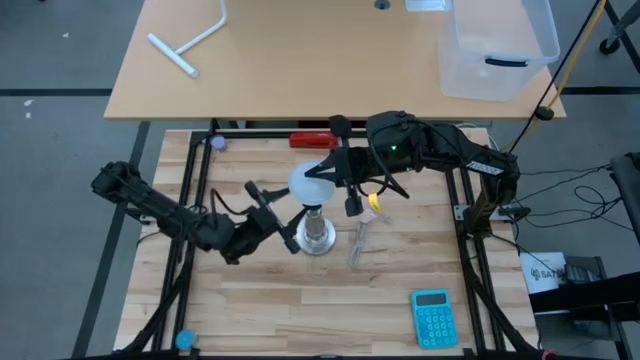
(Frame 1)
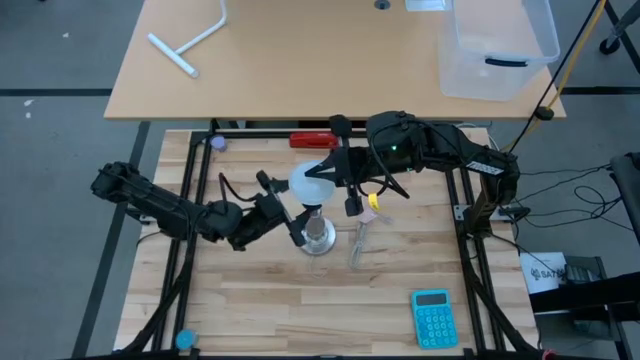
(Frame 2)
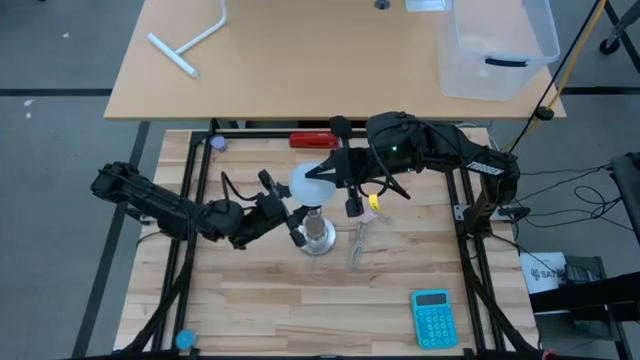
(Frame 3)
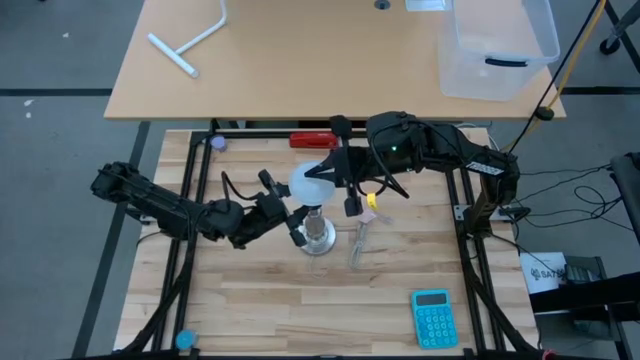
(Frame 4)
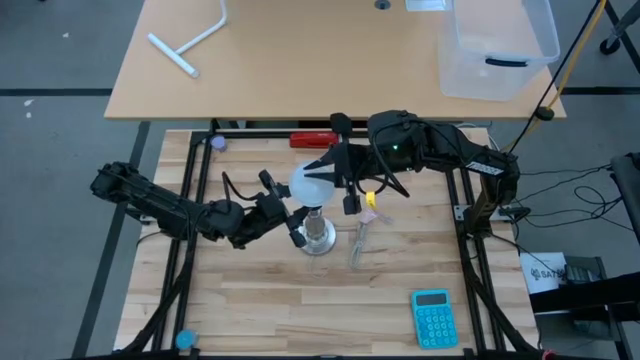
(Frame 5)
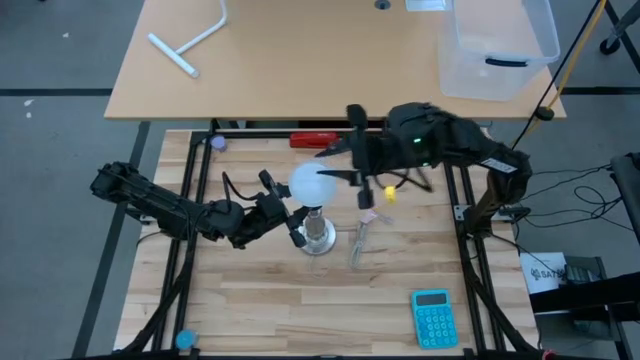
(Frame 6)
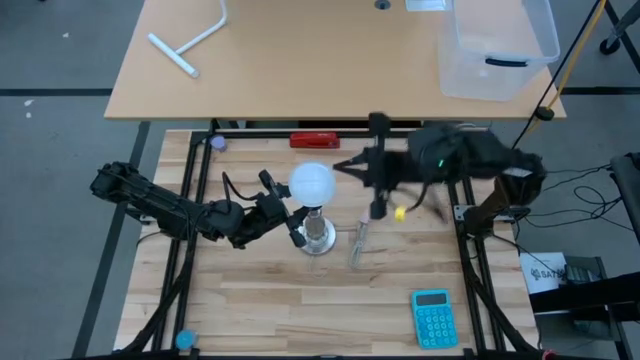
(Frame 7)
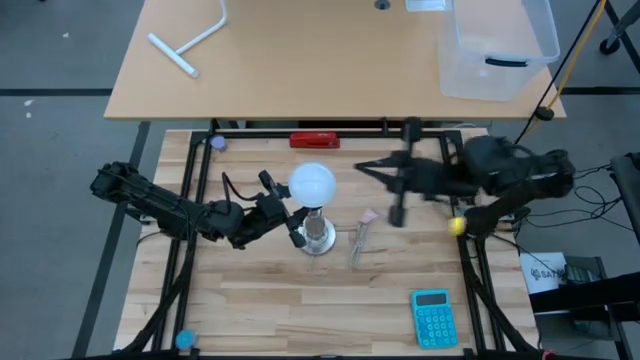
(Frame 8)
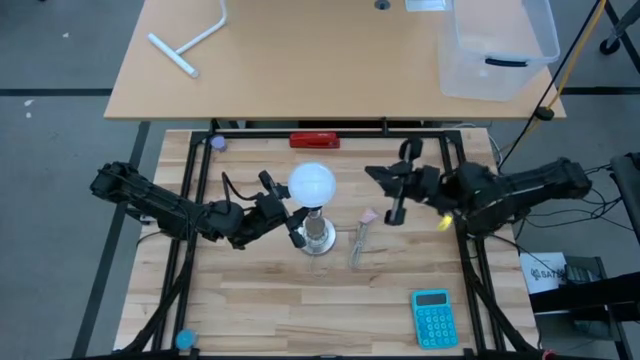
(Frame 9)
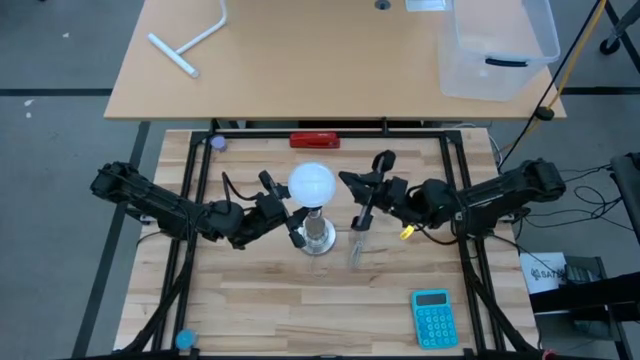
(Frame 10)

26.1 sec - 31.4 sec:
Task: Screw lightbulb
Insert the white lightbulb into the silver lamp

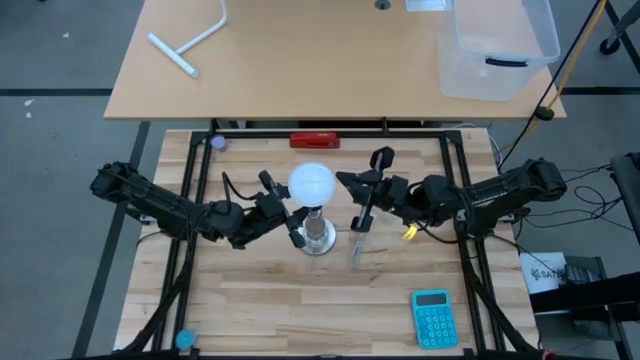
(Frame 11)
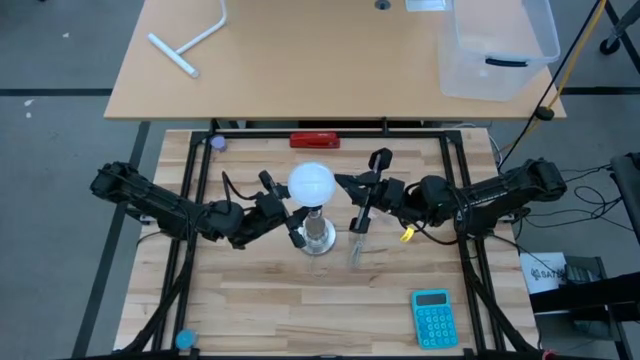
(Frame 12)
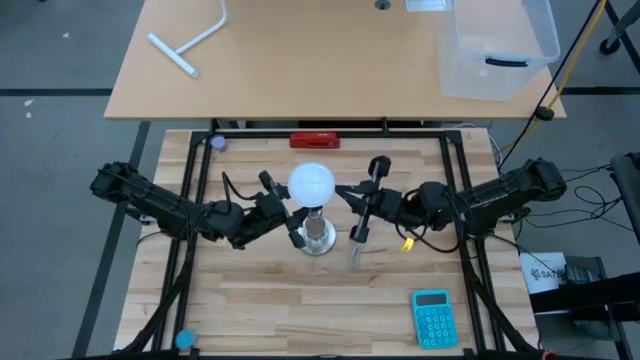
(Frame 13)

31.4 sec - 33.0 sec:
Insert the white lightbulb into the silver lamp

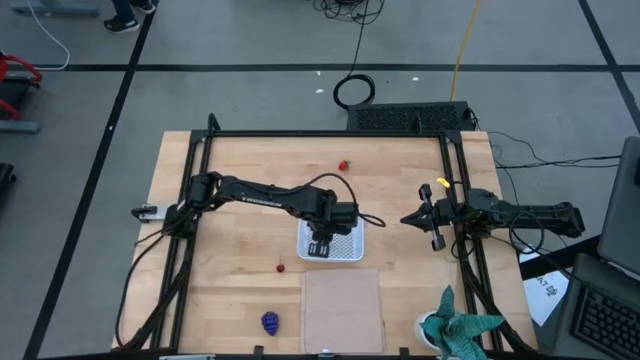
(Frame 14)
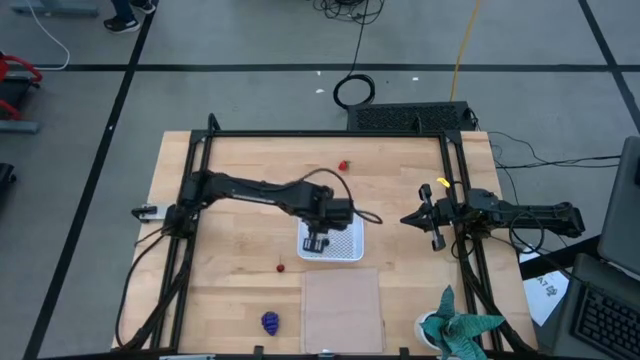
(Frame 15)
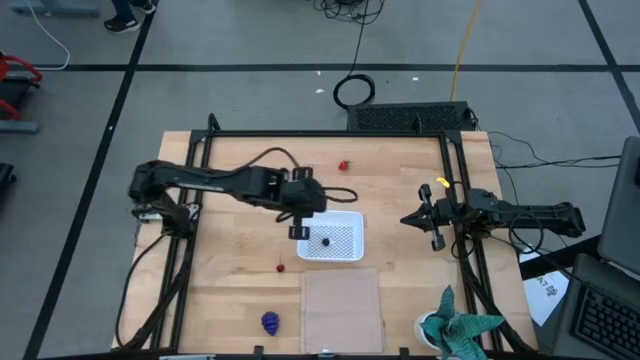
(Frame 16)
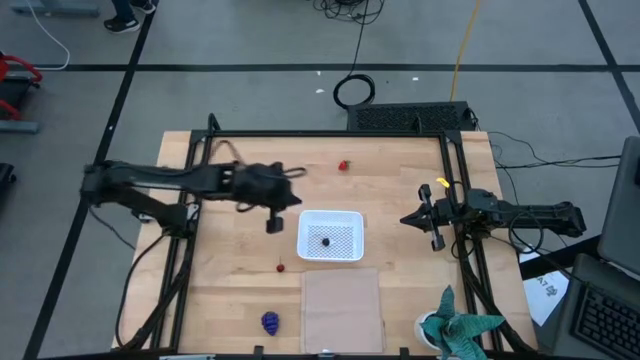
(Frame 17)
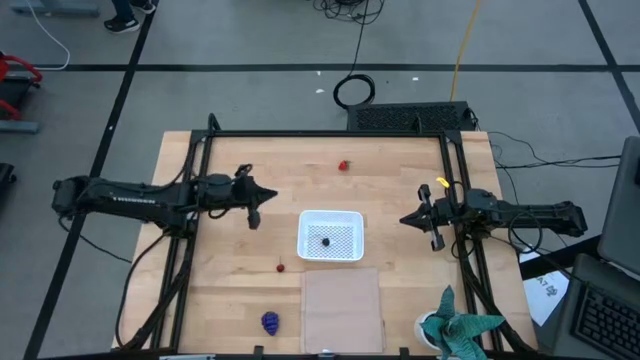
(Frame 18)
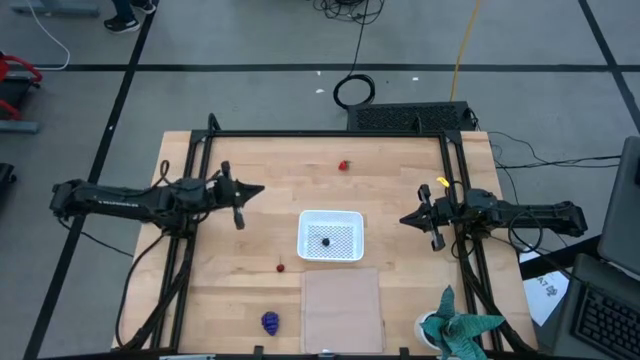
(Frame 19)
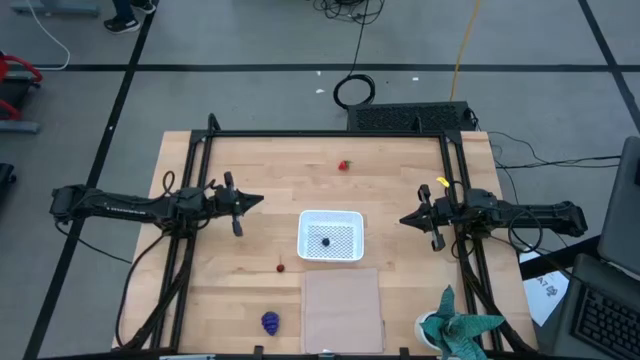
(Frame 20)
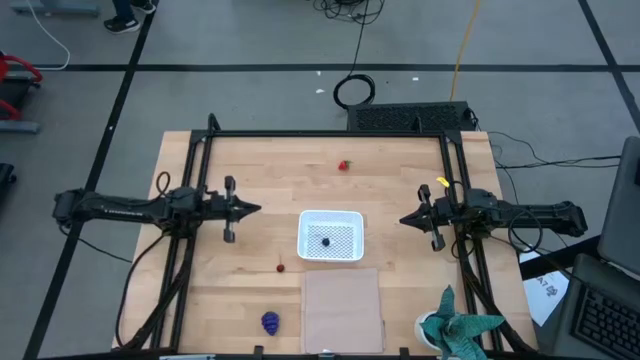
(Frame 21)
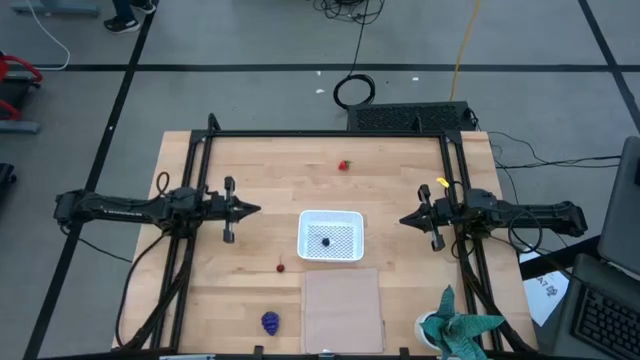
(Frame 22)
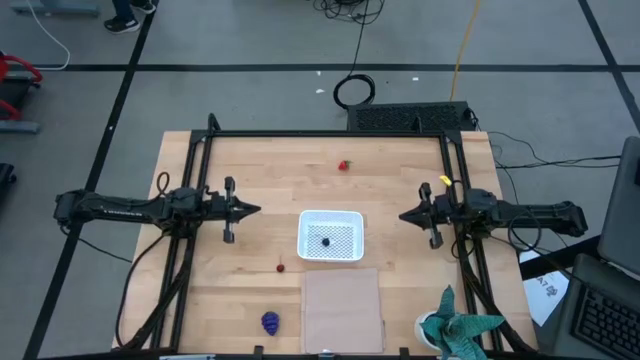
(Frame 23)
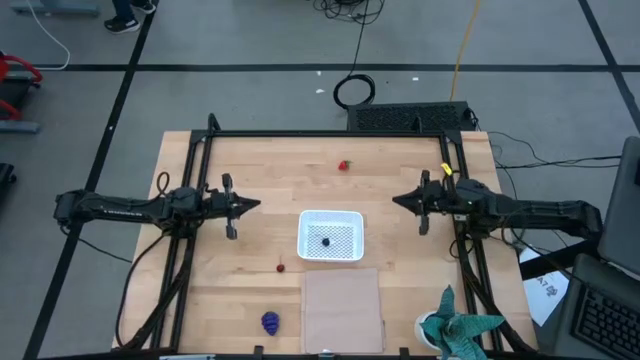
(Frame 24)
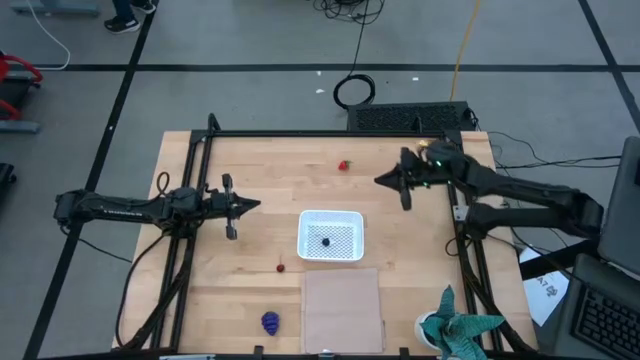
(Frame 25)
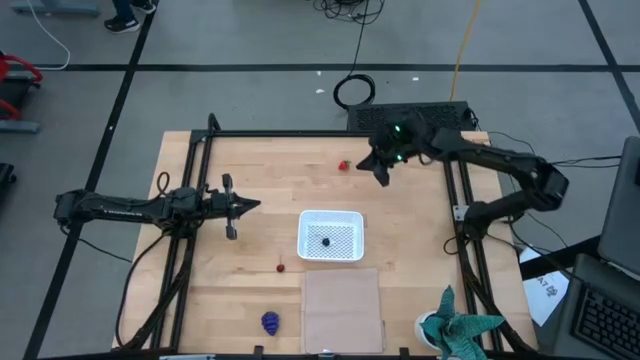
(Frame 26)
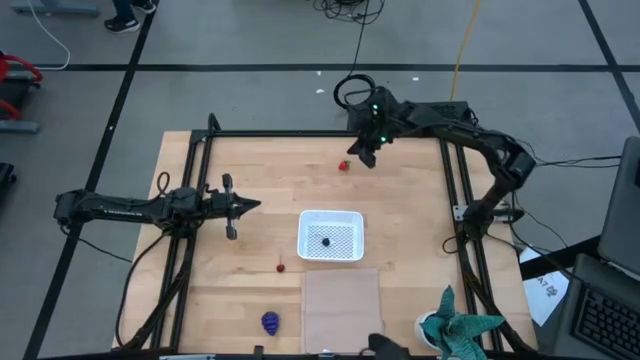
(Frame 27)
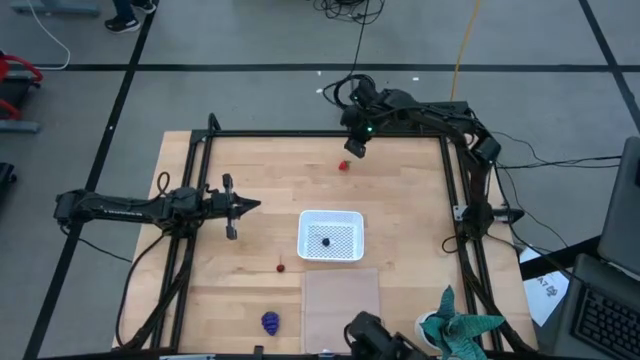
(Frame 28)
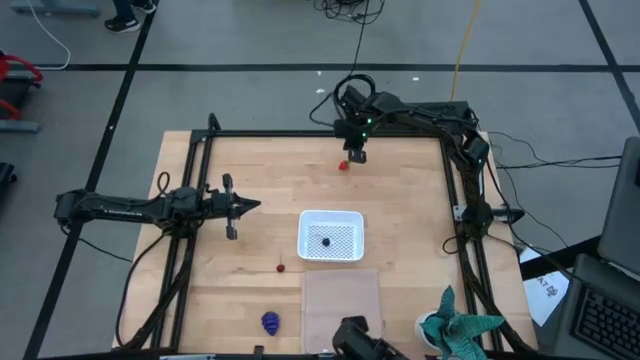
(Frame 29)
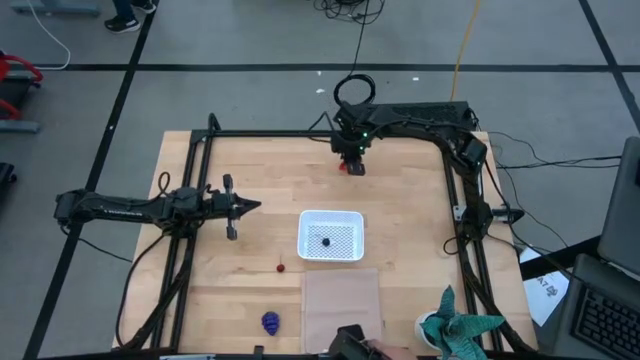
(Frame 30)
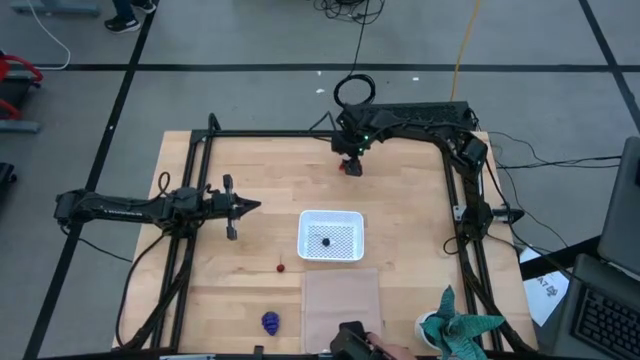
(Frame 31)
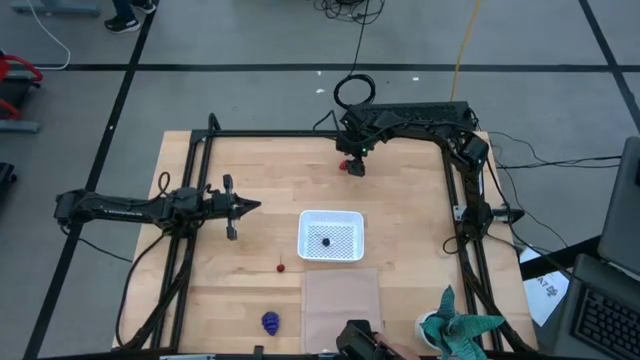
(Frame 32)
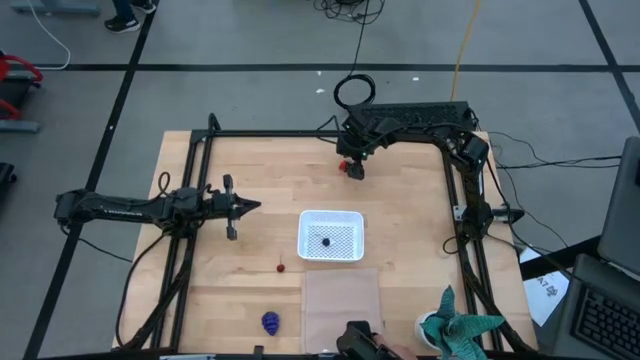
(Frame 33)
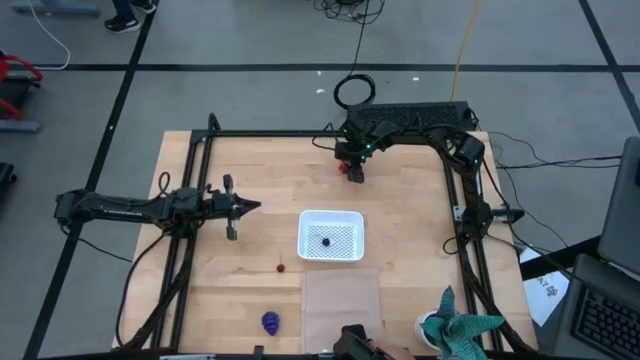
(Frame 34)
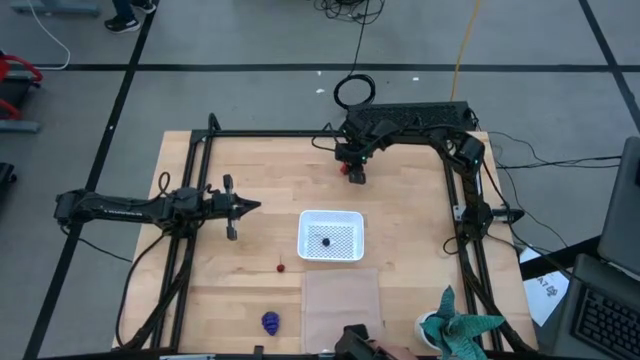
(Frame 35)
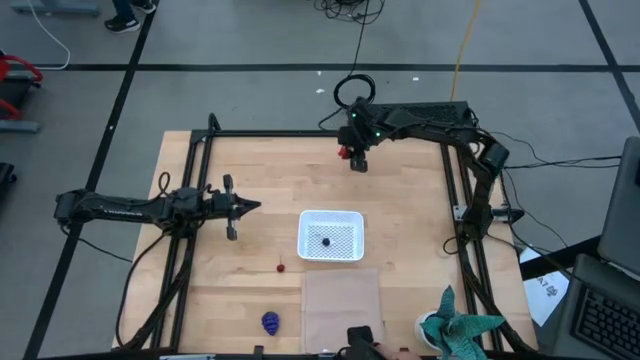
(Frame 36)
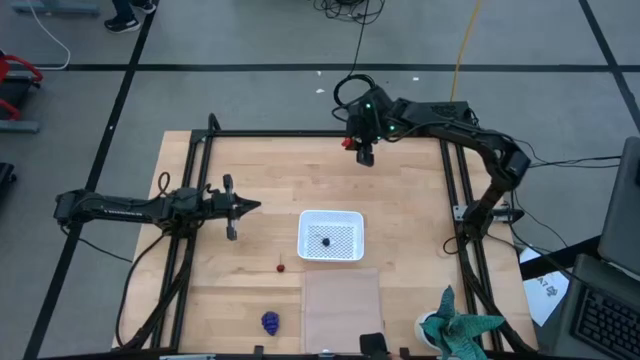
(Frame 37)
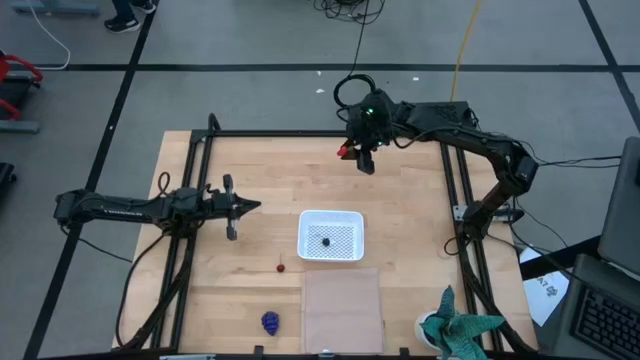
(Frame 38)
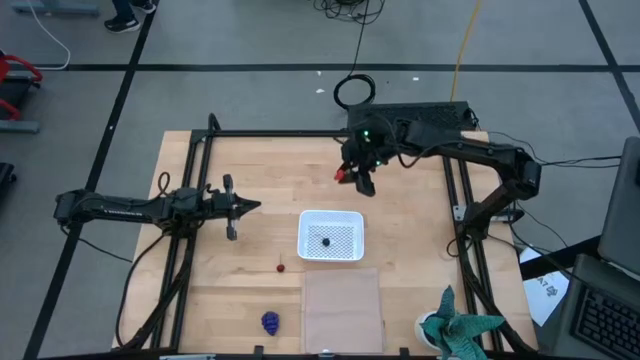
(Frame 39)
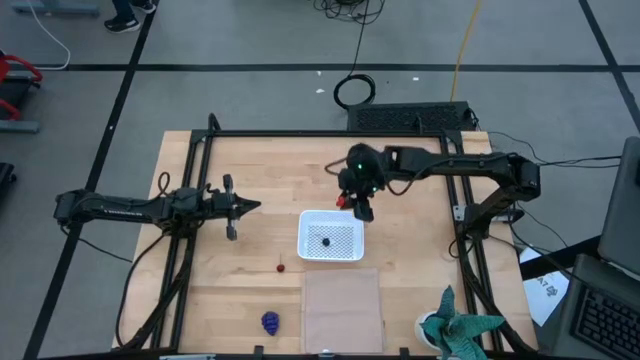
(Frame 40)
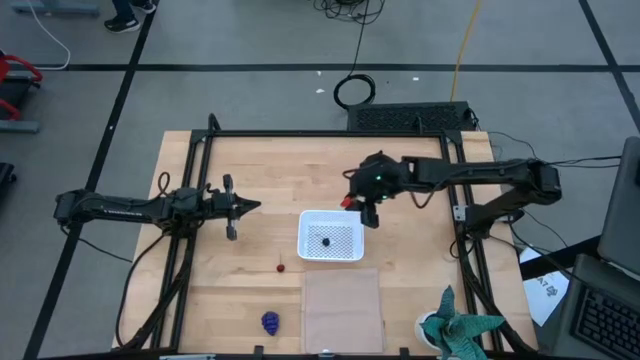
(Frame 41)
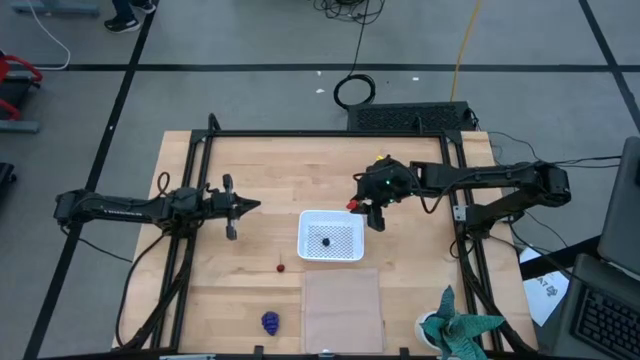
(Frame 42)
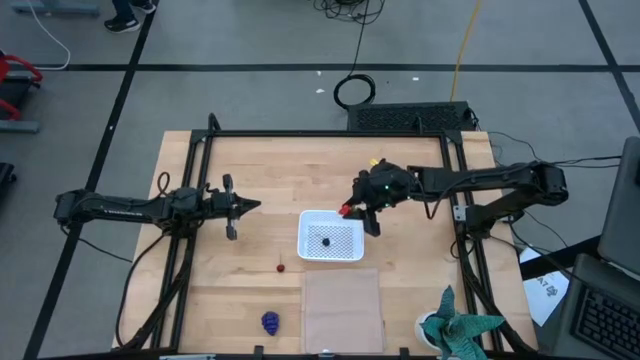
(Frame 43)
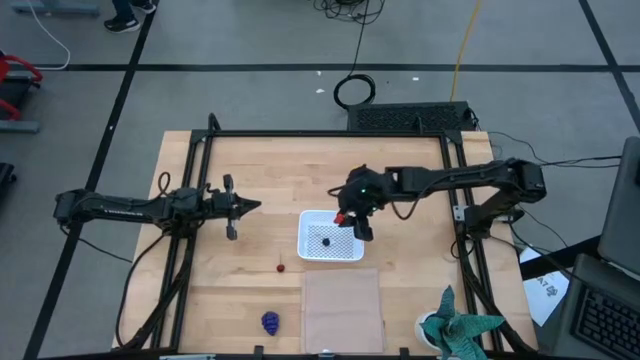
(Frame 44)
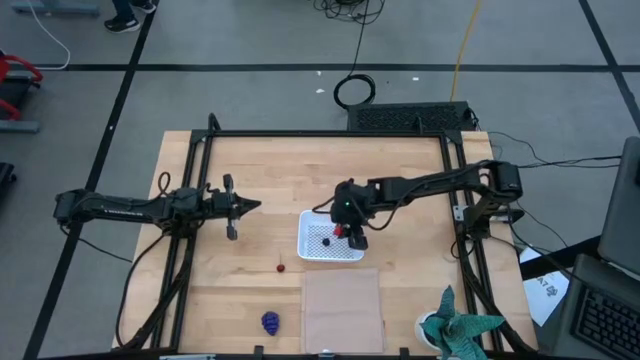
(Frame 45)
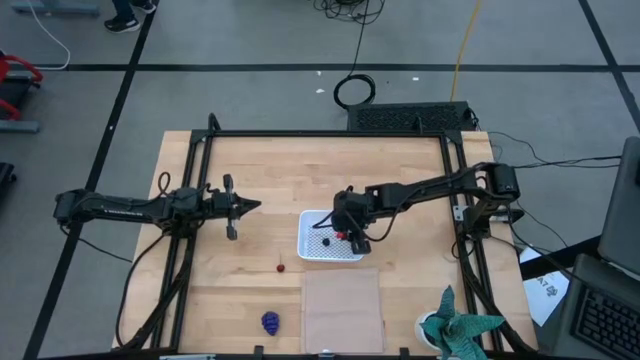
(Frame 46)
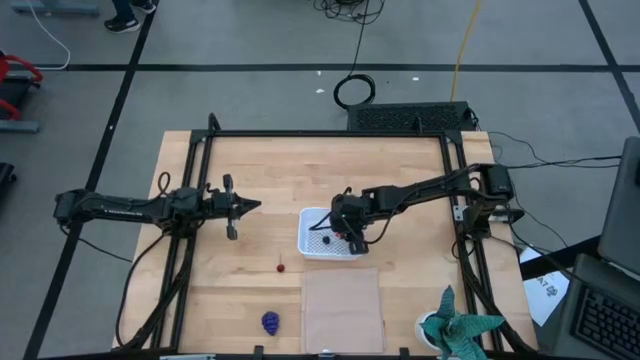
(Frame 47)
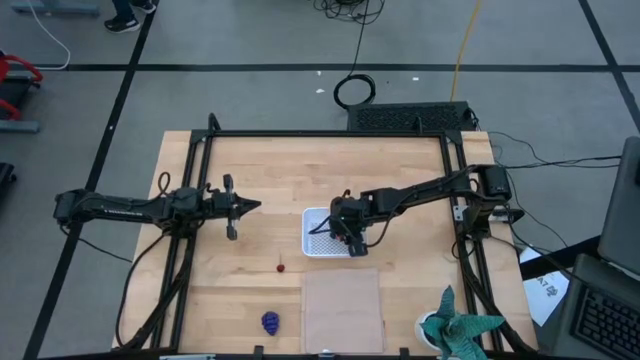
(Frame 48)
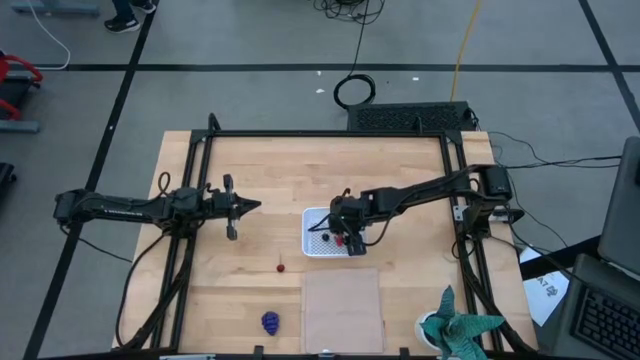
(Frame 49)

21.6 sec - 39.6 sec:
Task: Pick and placing Produce into tupperware
Put the red strawberry into the white bin
